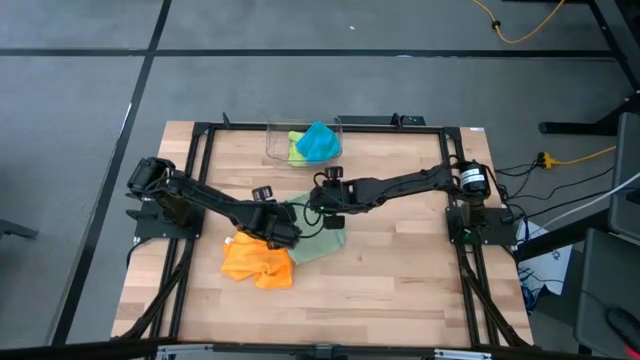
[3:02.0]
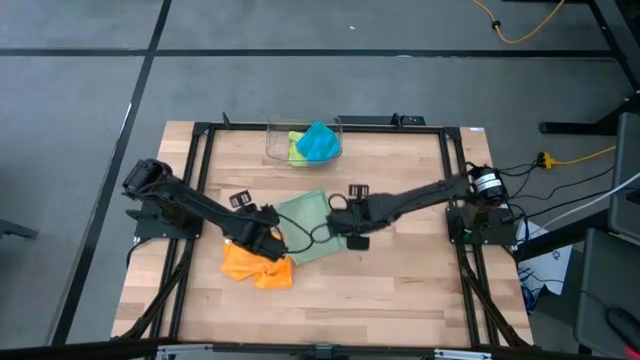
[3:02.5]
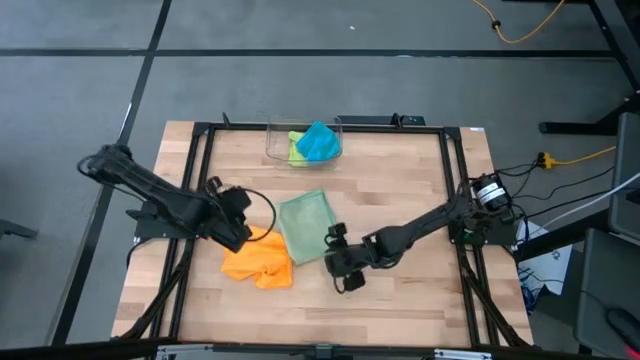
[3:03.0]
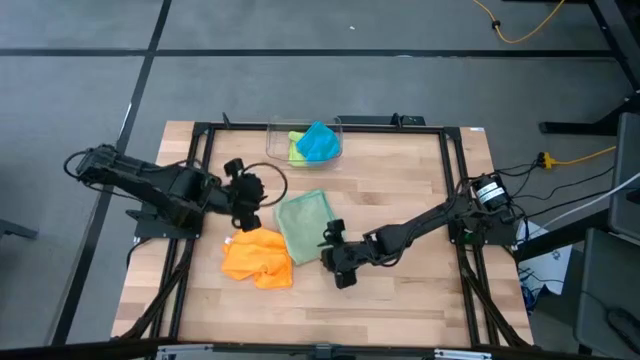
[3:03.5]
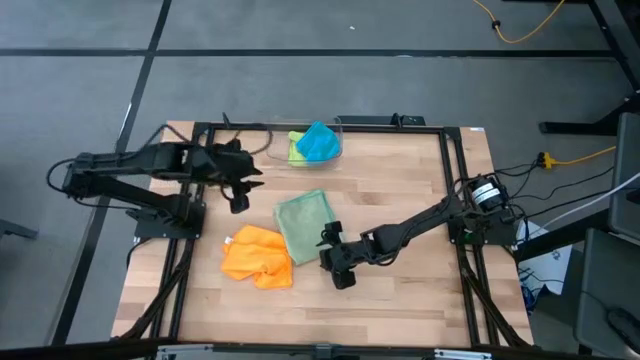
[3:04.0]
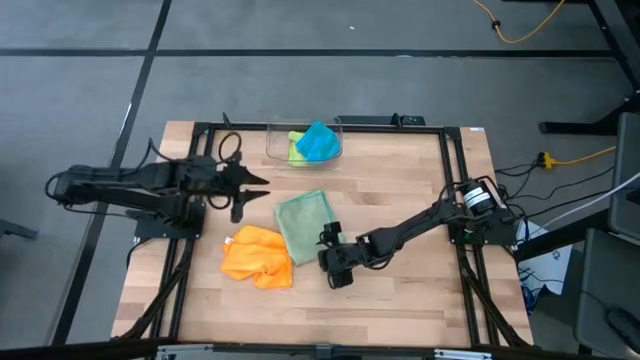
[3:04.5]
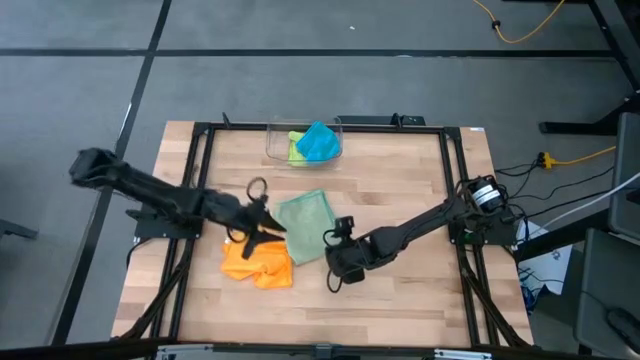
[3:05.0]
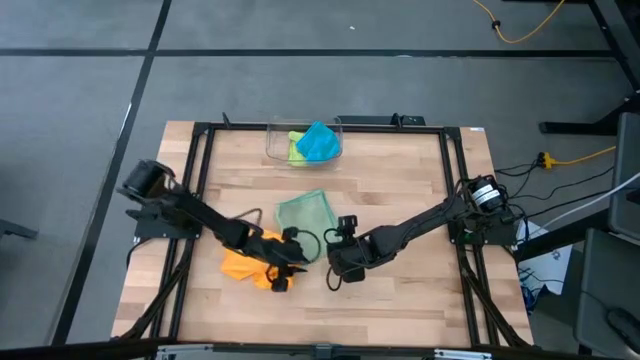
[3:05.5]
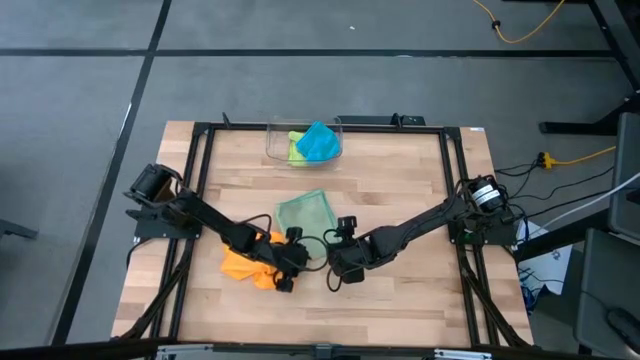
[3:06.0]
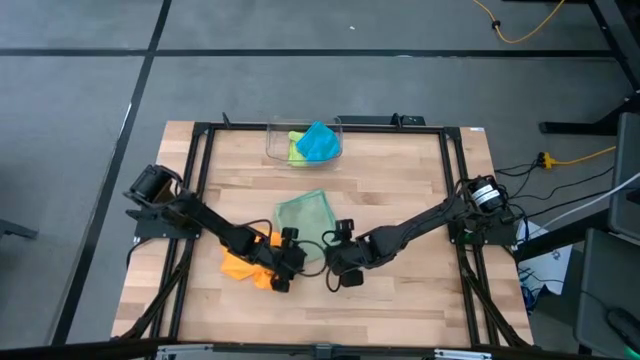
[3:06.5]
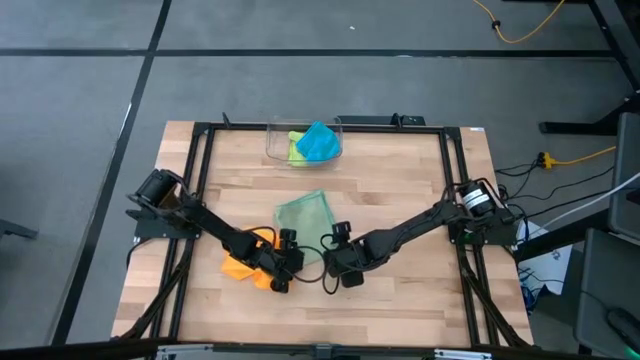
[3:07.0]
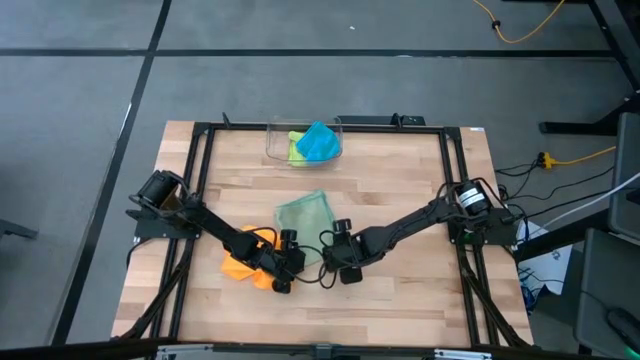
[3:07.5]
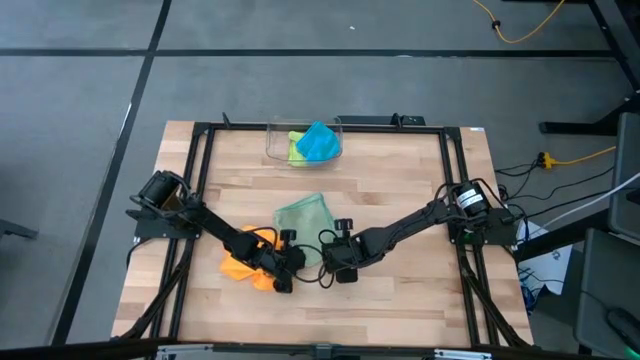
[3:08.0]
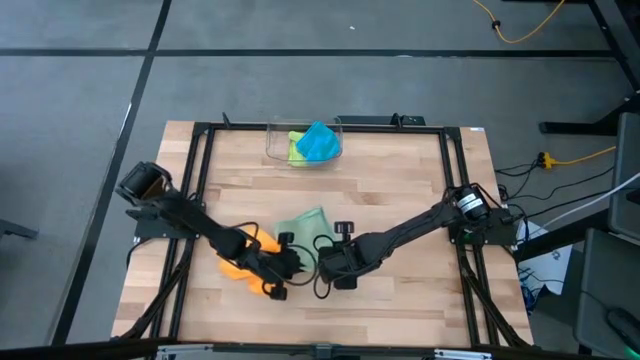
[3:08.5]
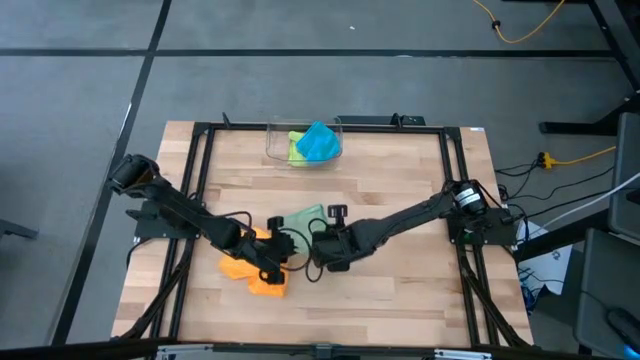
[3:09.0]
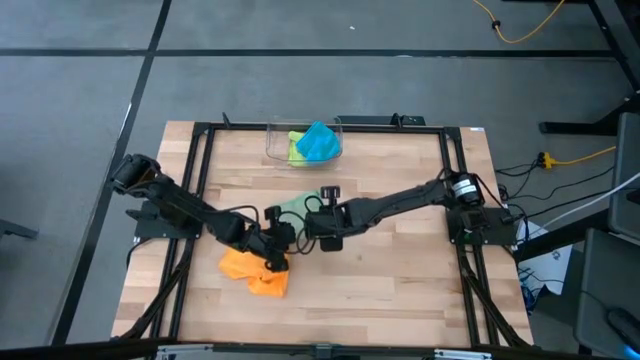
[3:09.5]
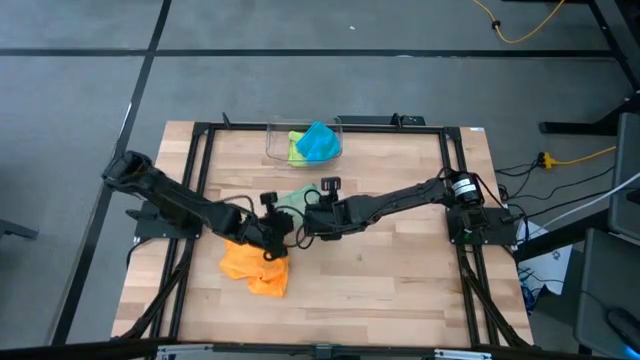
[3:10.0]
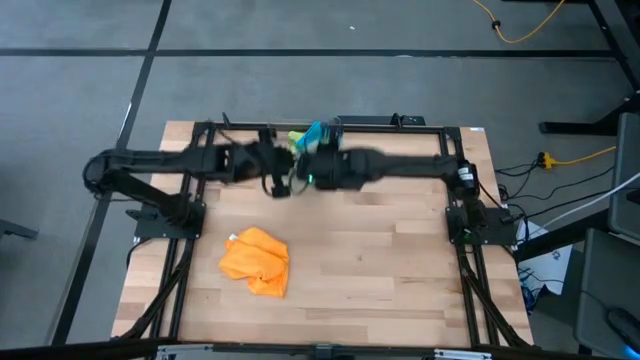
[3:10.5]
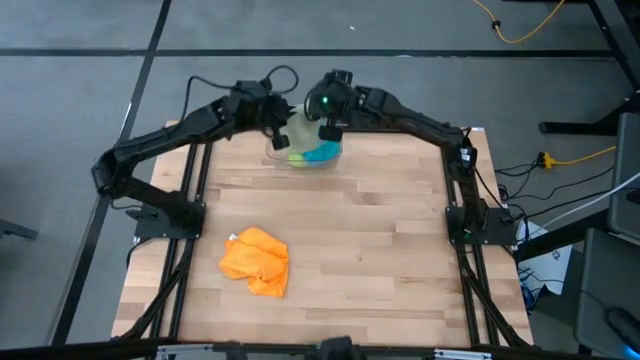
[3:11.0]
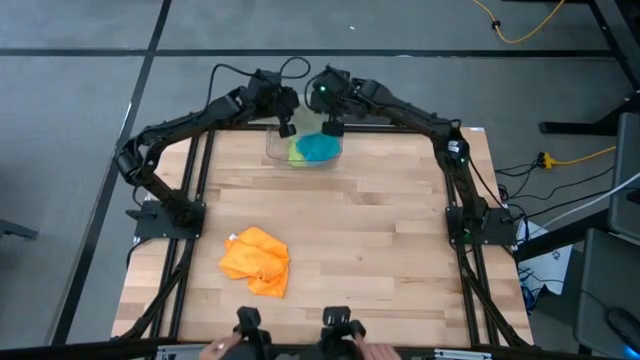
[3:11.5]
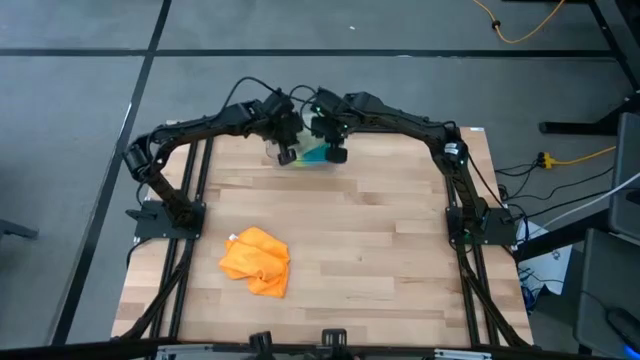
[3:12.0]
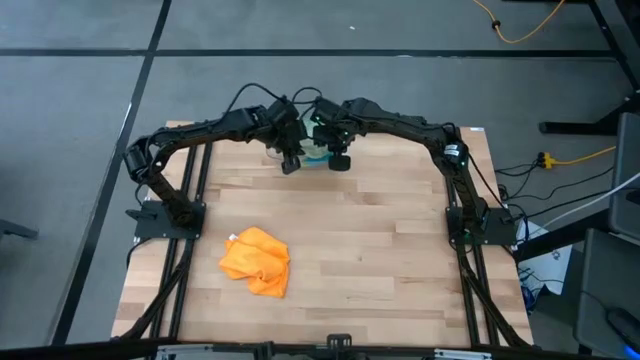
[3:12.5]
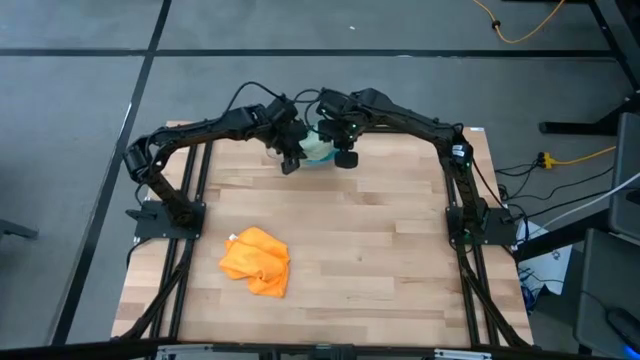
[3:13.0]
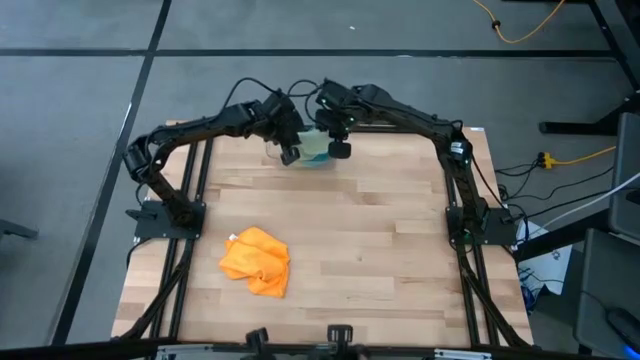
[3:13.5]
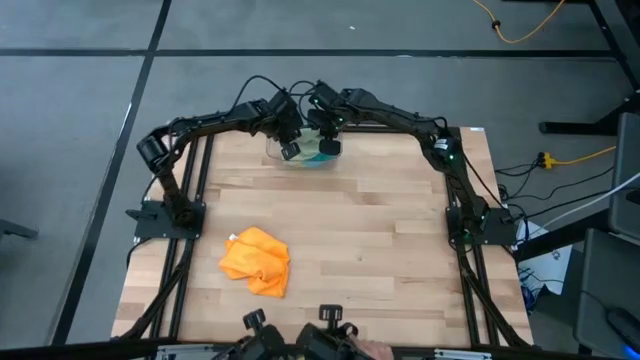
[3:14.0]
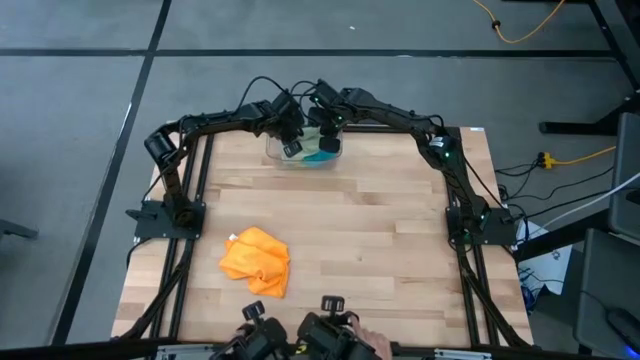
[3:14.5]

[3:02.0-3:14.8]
Task: Fold microfiber towels
Put the green towel into the transparent bin

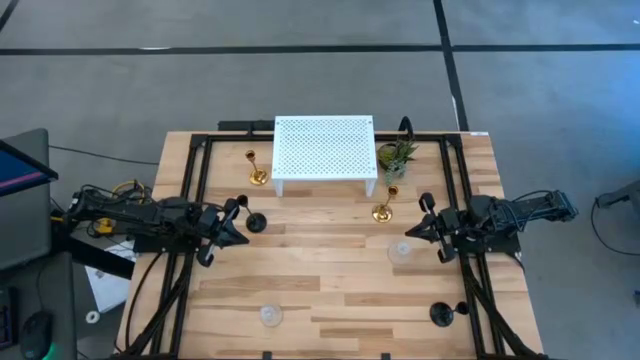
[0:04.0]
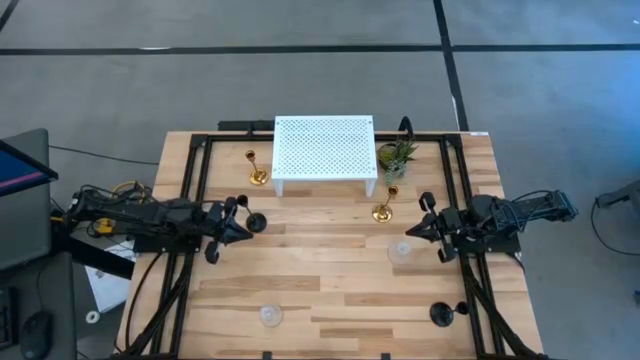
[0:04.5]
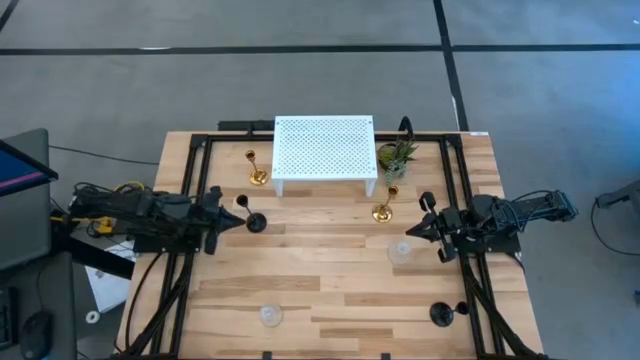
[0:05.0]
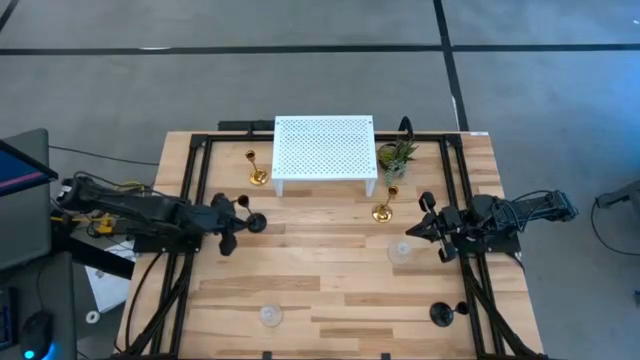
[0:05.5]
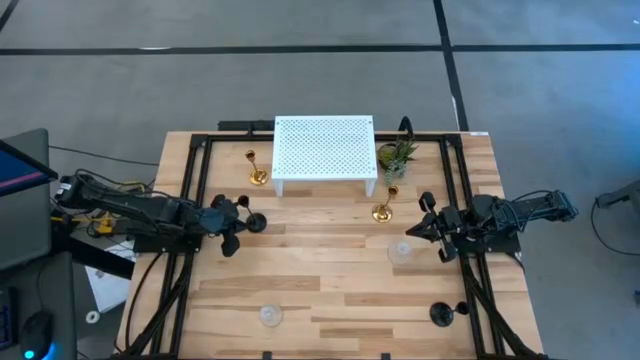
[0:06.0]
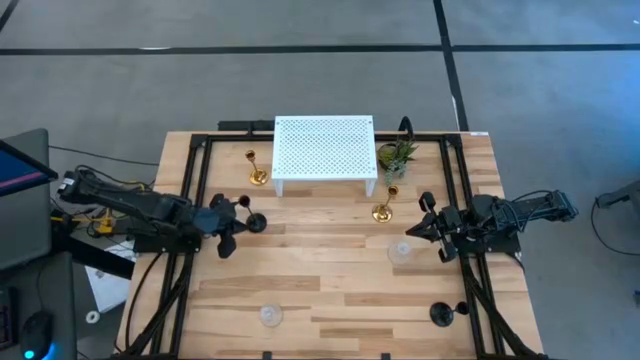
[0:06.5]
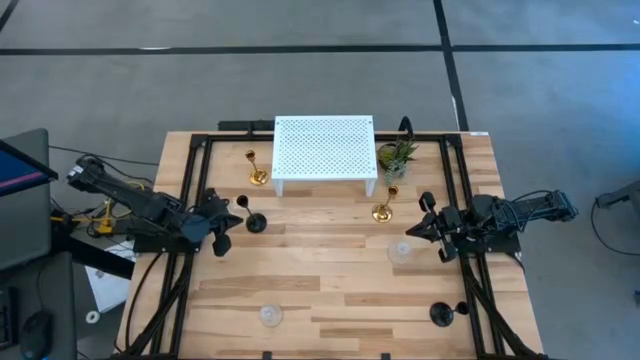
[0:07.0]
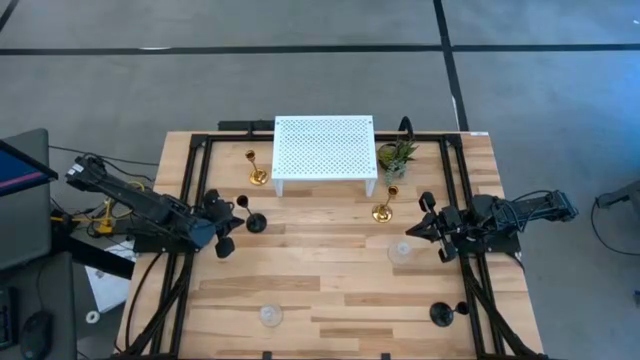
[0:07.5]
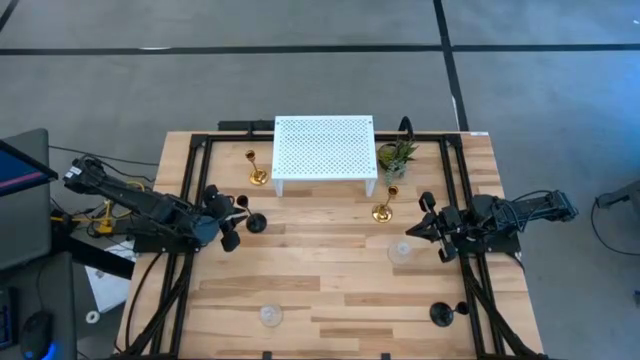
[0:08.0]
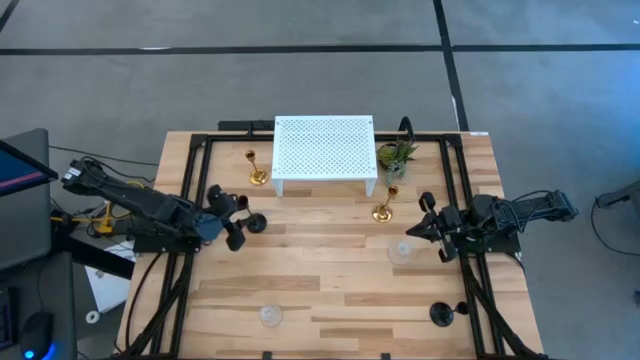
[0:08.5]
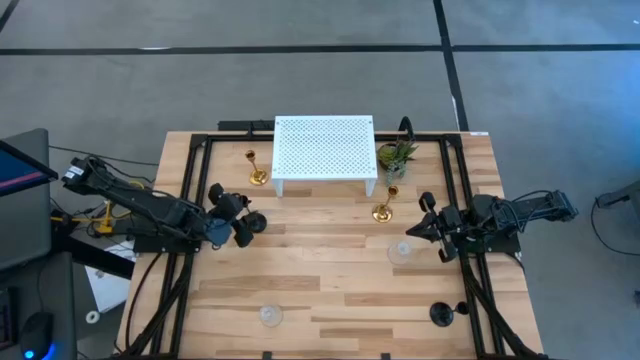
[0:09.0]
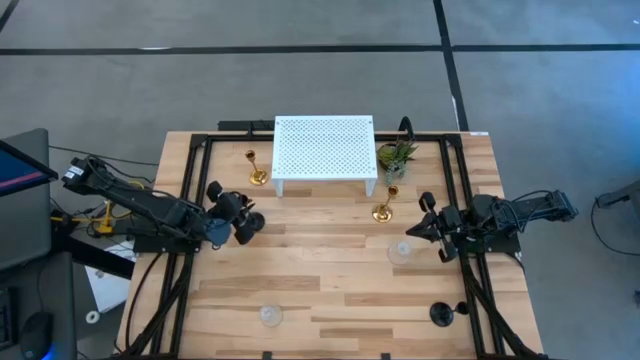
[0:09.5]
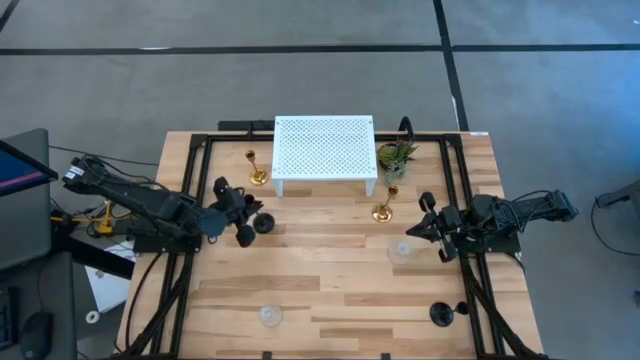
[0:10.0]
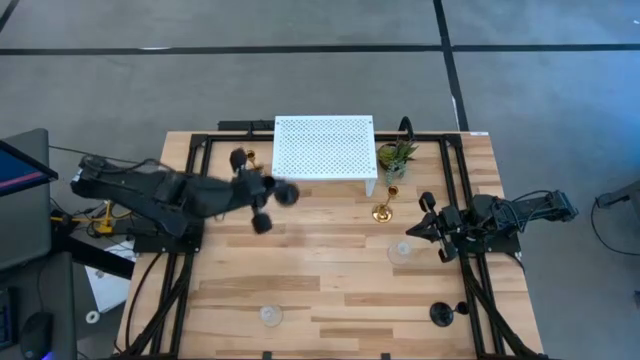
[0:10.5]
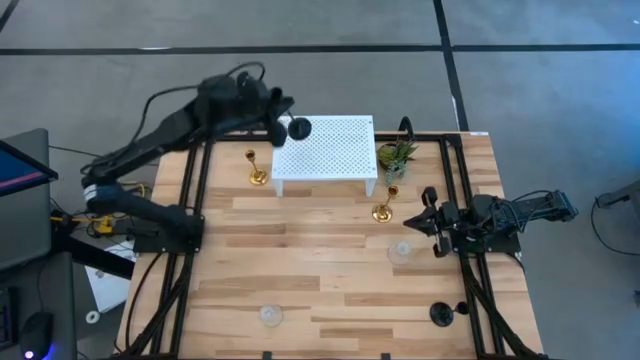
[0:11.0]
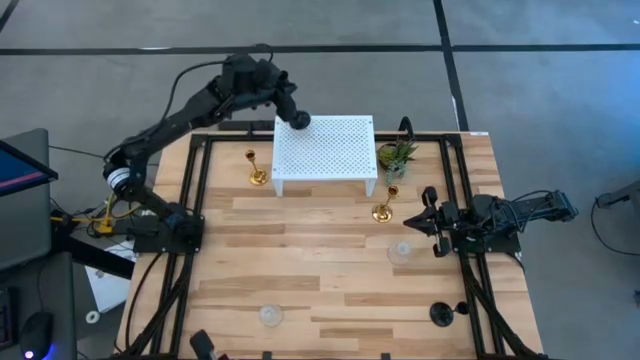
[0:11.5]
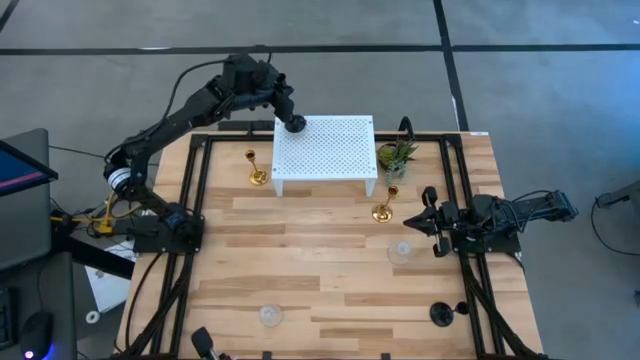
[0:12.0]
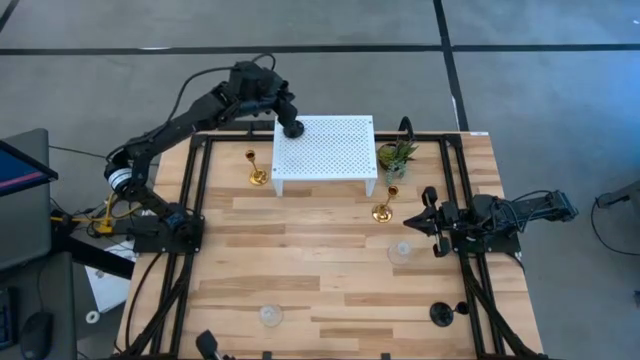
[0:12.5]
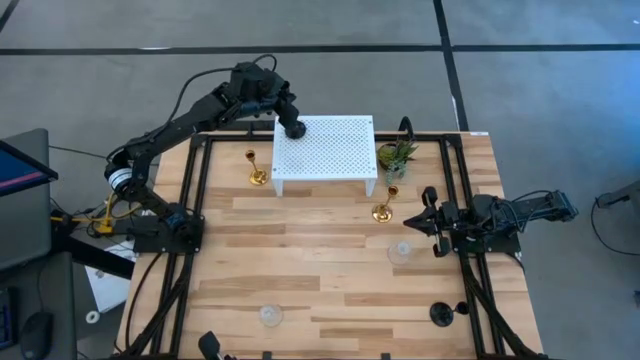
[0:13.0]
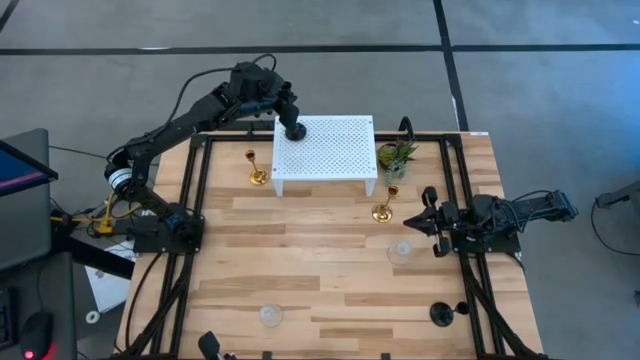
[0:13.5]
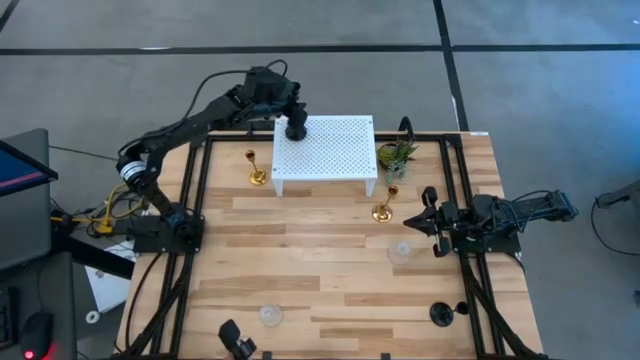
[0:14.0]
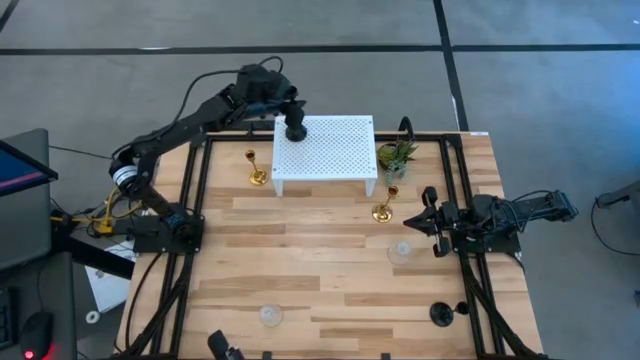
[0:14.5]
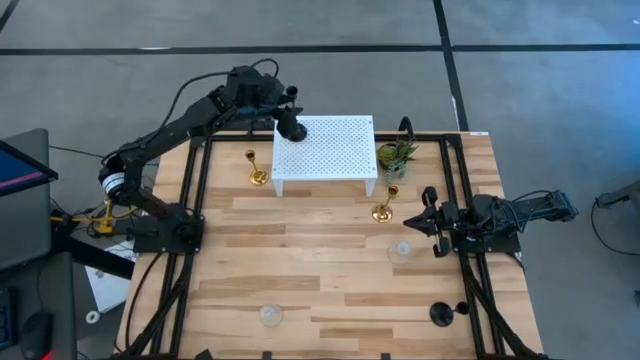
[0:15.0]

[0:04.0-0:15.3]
Task: Pick & Place candle stick holders
Put the top black candle holder on the shelf
